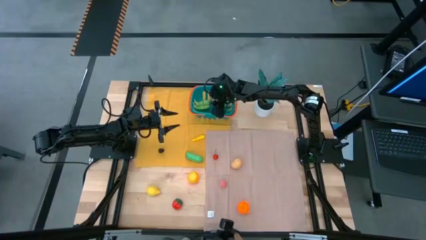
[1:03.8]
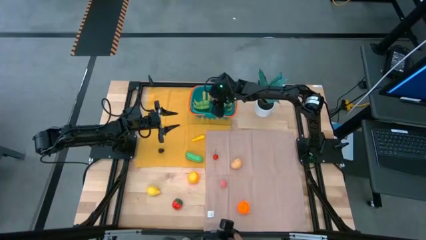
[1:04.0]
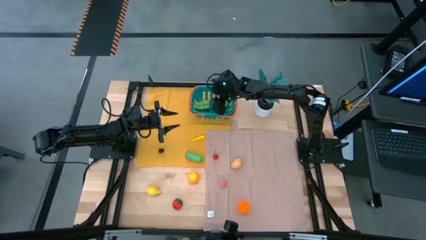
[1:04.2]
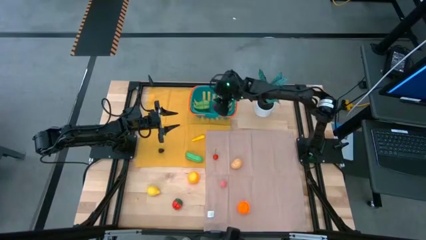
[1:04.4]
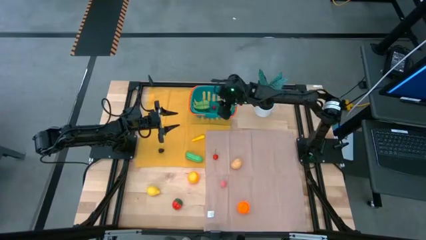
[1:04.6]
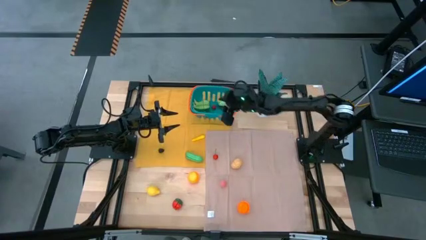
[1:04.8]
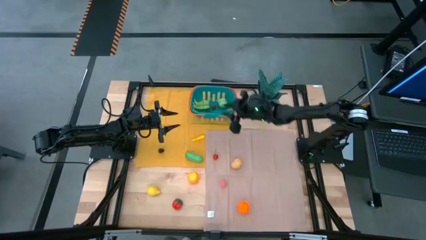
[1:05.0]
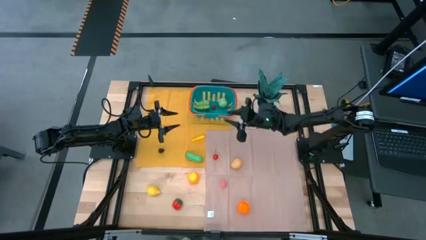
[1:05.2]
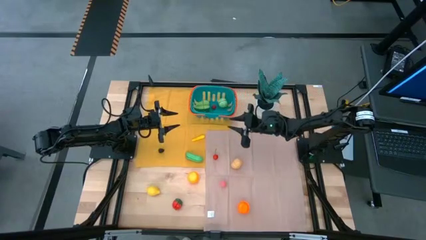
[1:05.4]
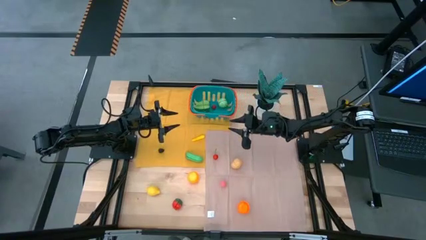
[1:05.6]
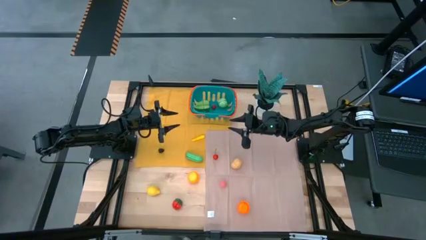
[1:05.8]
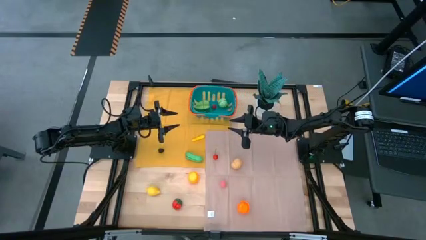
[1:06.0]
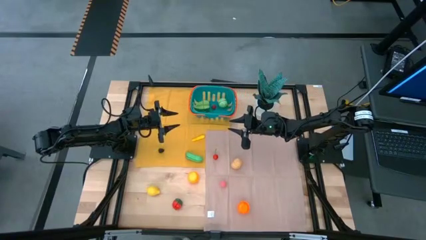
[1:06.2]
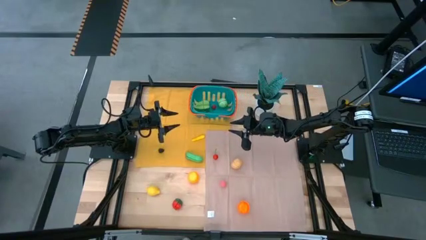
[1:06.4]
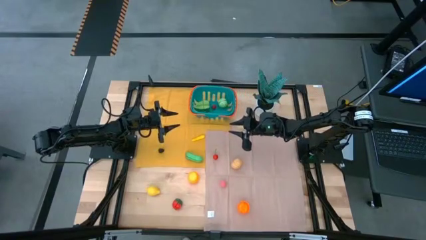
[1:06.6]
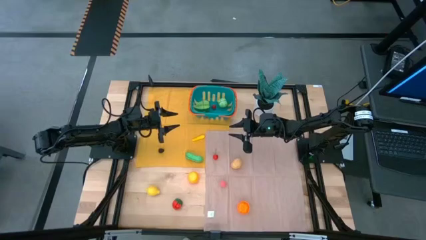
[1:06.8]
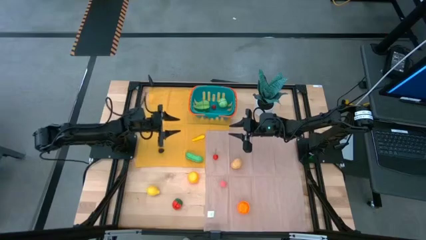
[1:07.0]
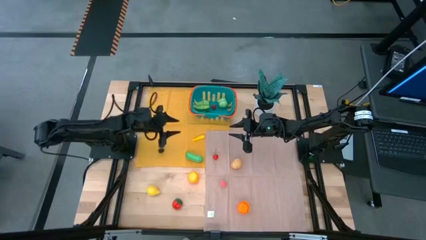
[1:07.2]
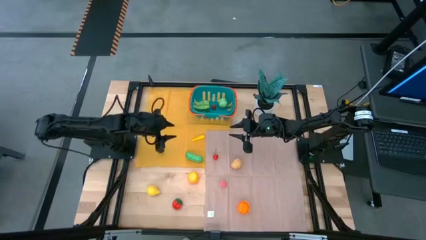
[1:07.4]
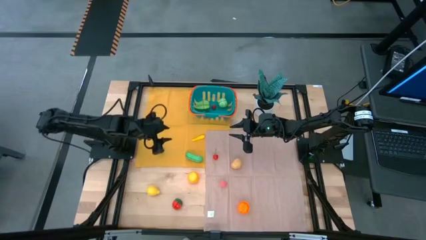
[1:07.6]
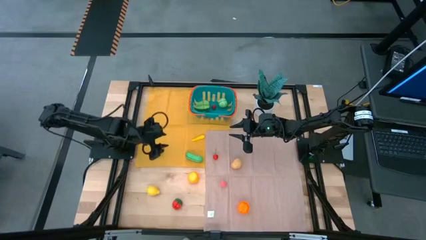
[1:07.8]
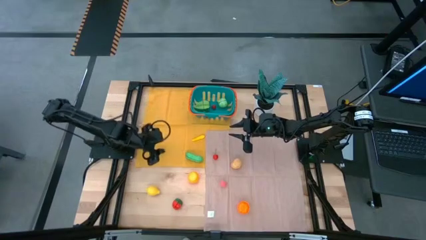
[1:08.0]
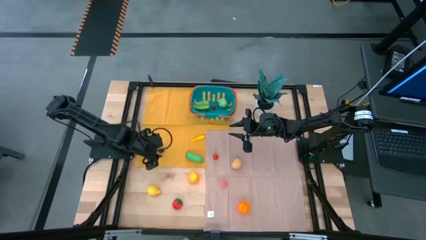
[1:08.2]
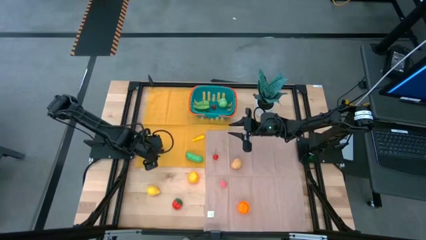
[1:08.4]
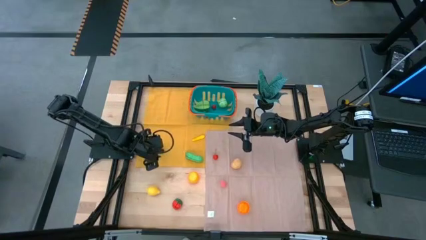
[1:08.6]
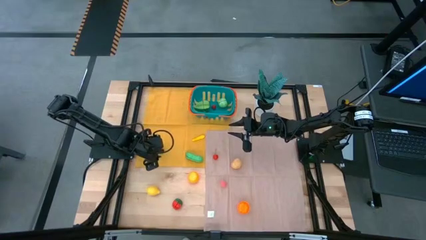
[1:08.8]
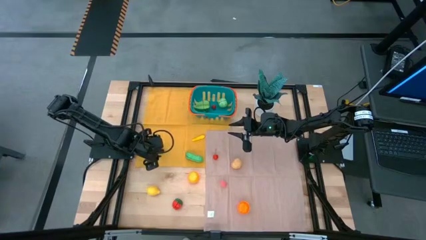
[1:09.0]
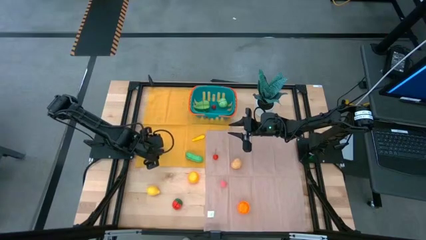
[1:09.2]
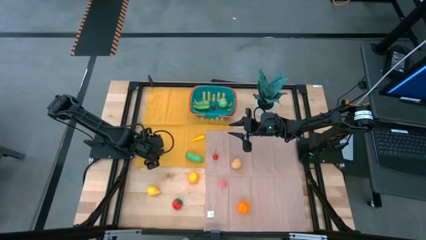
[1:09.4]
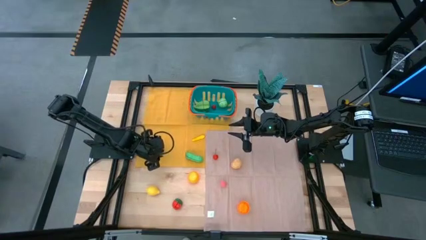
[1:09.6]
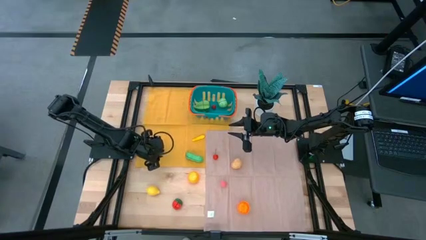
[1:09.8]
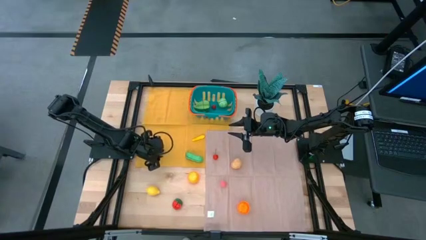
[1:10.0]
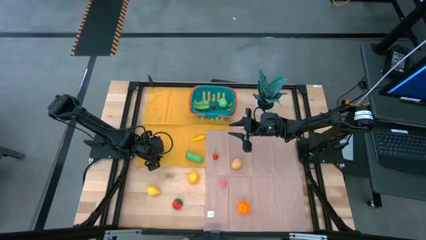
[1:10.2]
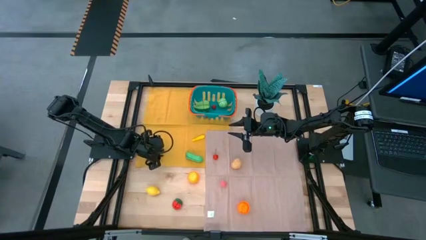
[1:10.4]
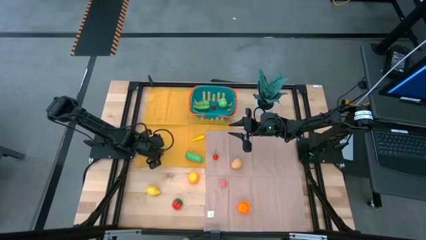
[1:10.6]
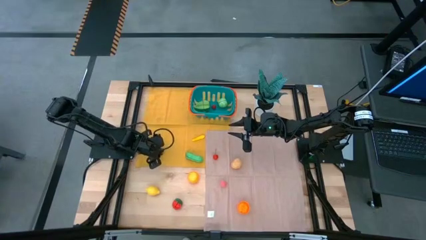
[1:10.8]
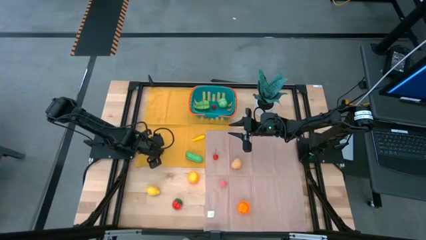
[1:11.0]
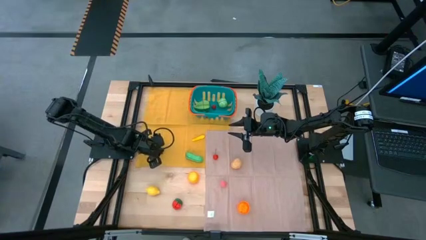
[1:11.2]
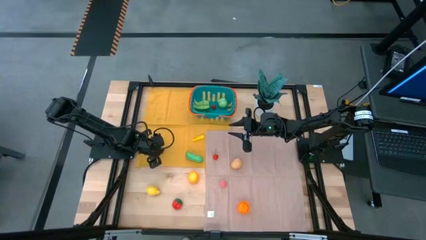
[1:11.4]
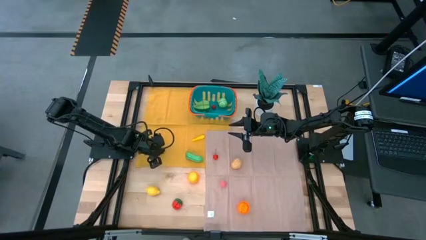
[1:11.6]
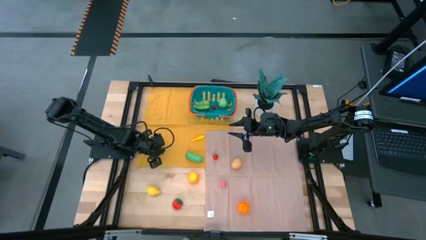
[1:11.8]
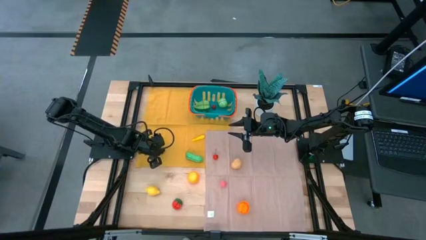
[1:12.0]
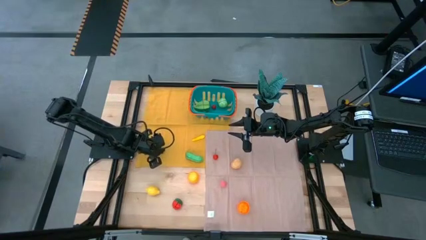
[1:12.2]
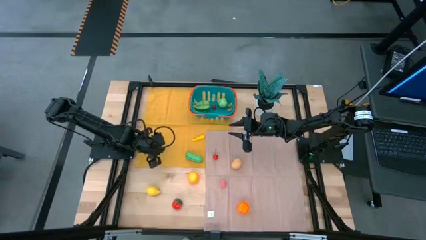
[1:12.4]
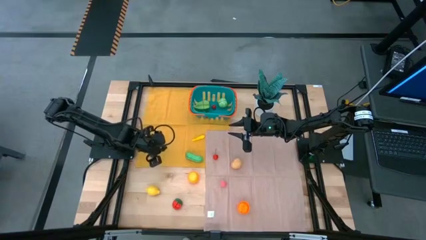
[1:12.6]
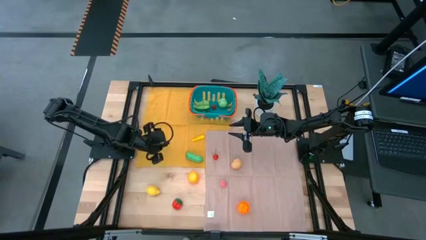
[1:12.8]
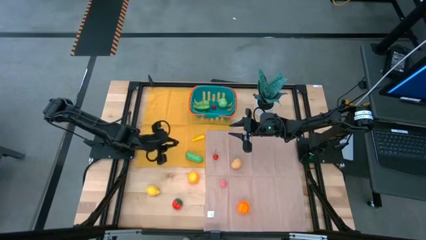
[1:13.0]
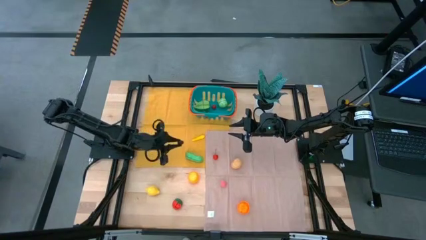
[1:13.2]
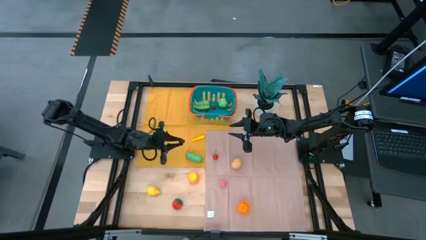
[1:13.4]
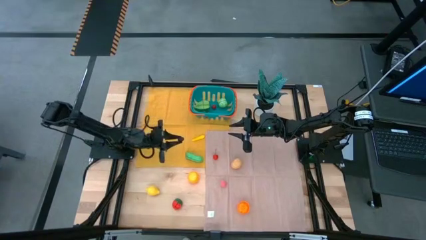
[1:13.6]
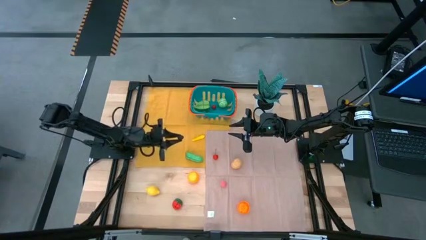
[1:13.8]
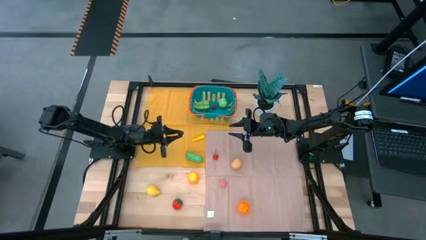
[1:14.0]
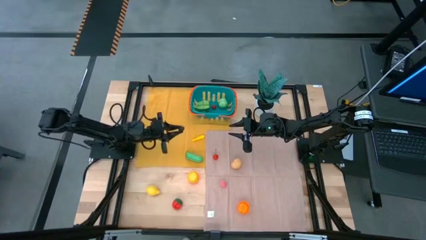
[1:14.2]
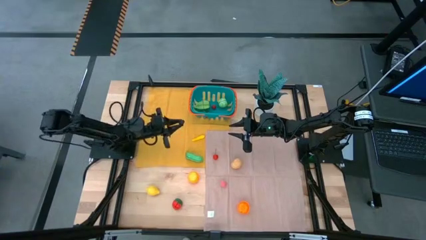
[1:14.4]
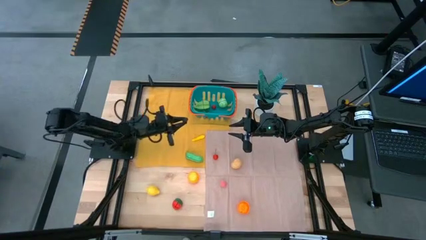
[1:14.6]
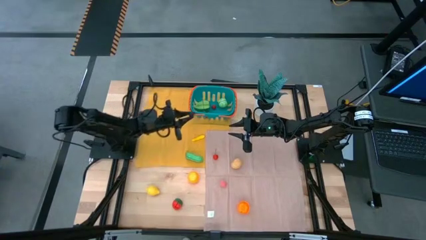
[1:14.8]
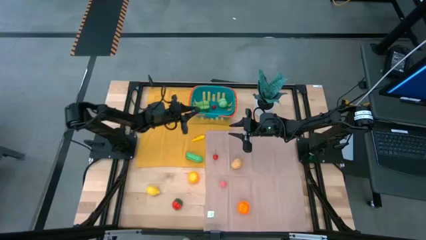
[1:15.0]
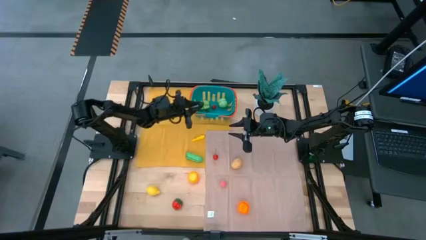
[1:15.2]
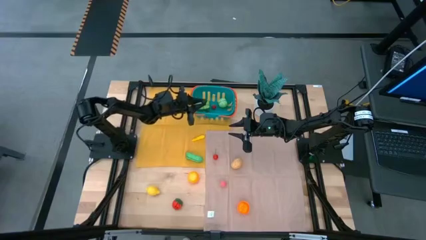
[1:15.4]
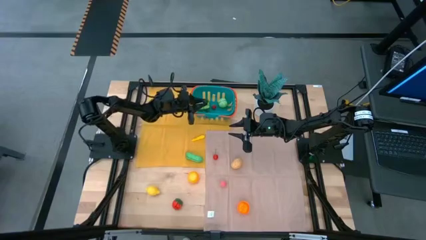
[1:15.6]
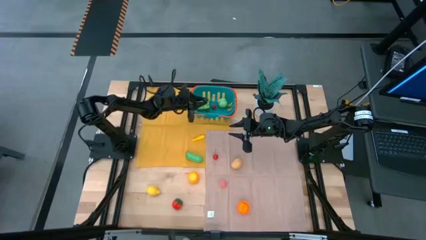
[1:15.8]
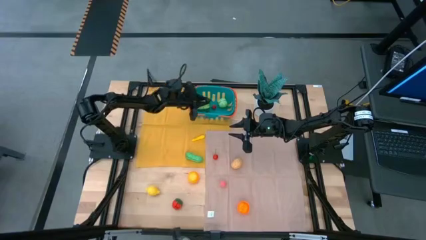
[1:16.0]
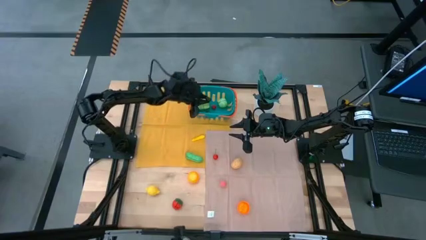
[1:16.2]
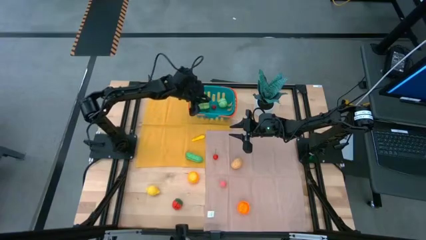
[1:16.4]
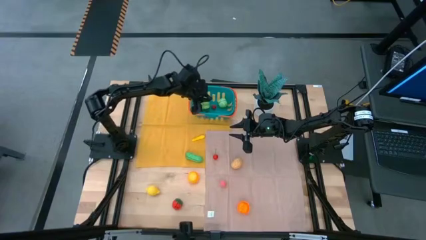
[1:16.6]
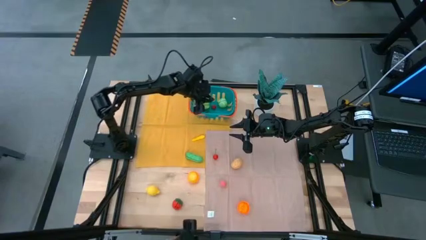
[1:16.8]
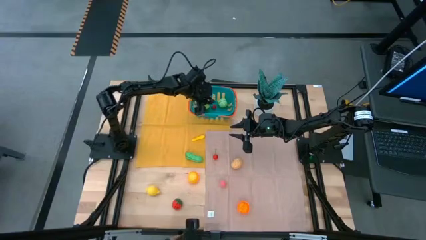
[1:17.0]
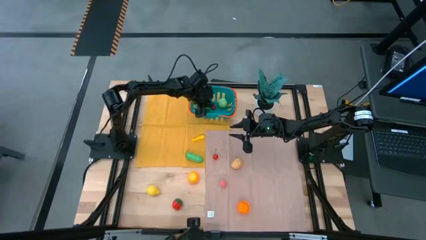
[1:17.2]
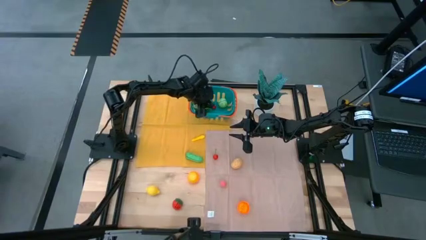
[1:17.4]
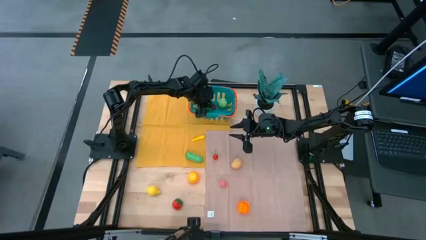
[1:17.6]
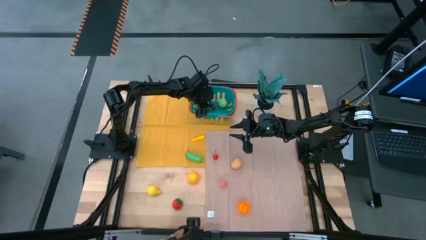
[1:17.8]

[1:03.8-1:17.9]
Task: Pick and placing Produce into tupperware
Put the blackberry into the blue basket

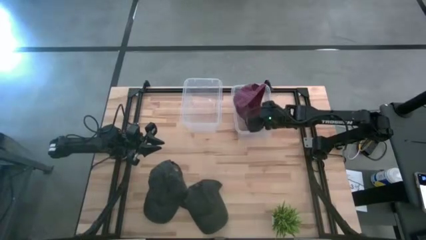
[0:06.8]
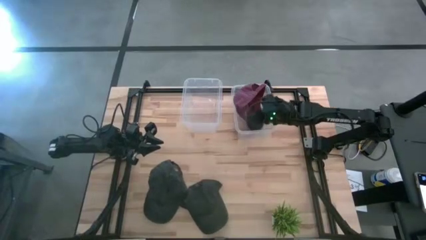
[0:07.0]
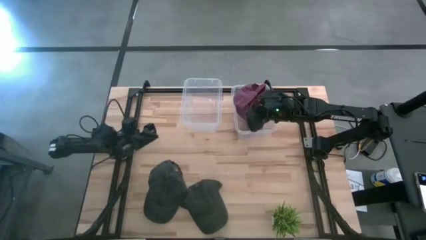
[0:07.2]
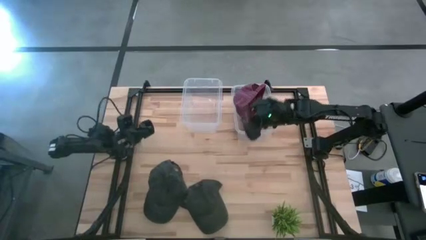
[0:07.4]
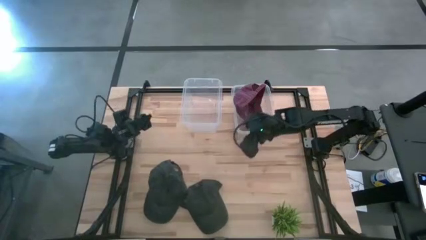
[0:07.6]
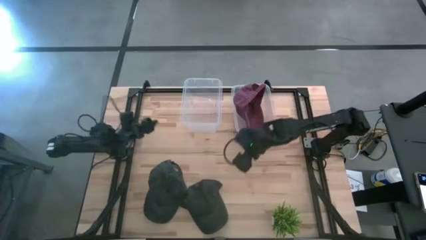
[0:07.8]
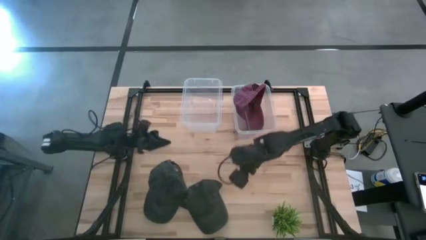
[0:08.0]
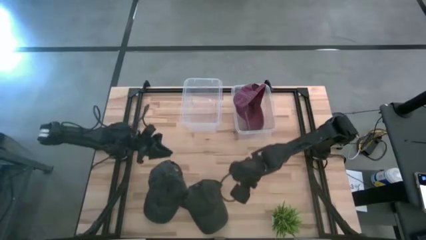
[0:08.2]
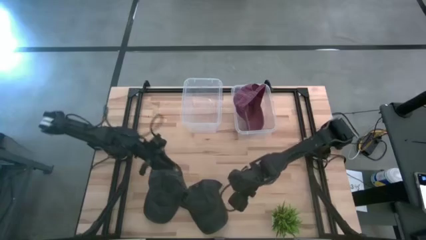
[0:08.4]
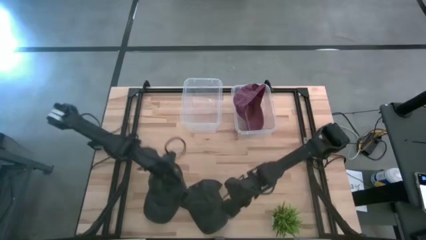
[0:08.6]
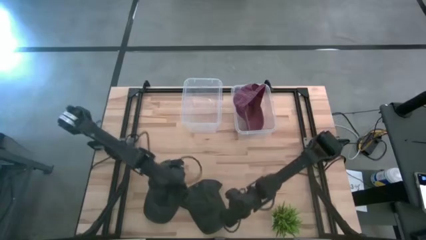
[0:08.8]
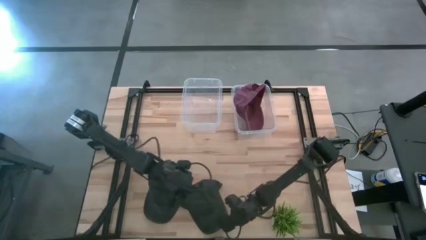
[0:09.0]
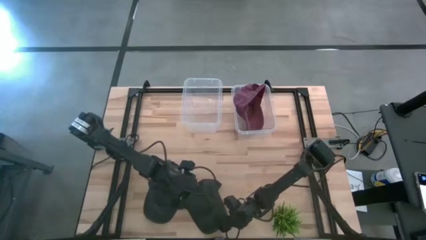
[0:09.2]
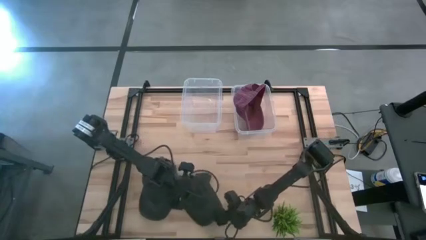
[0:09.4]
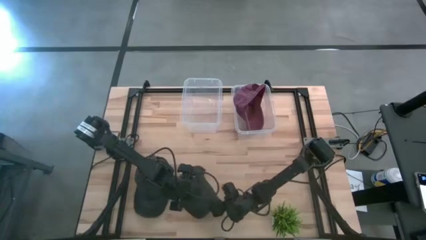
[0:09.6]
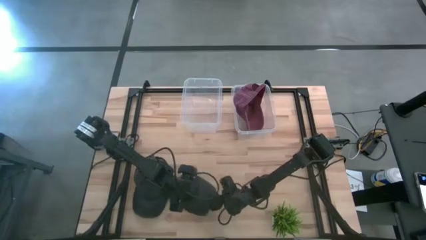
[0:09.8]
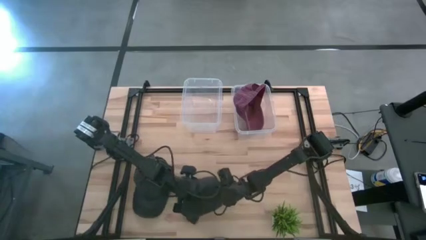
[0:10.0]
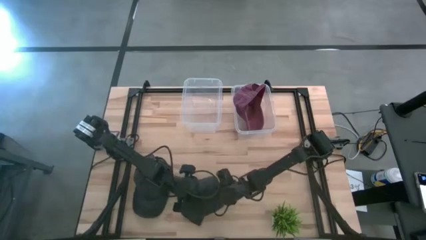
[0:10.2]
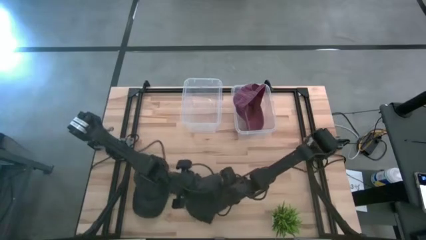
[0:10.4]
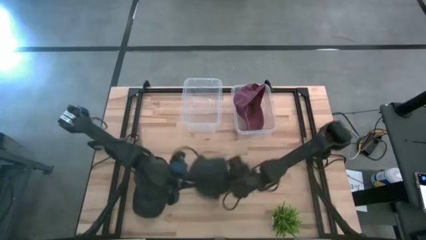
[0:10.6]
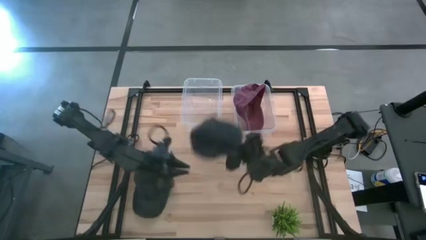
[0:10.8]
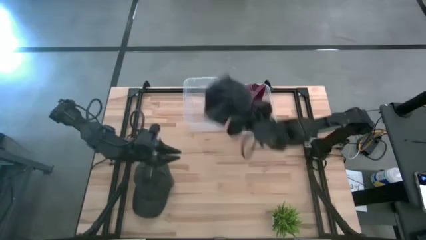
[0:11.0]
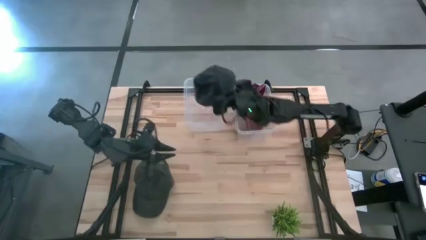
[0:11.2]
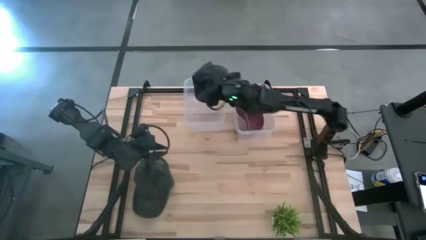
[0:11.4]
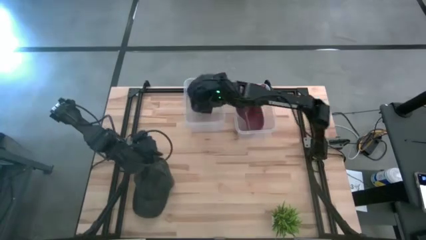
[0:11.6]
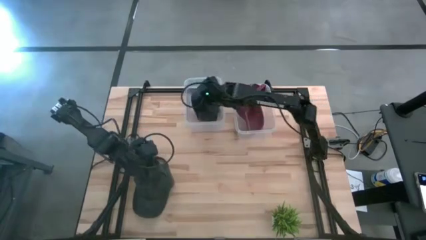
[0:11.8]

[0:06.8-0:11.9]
Task: Pick & Place hat
Put the right black cap into the left transparent bin
